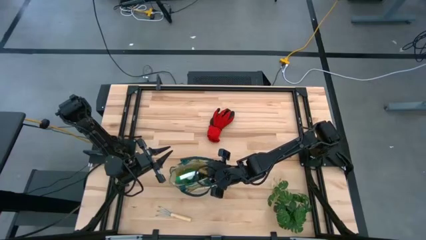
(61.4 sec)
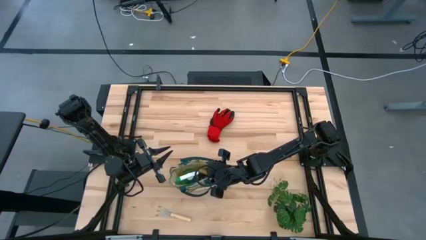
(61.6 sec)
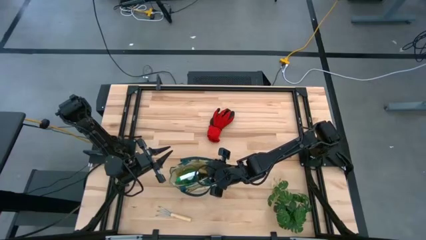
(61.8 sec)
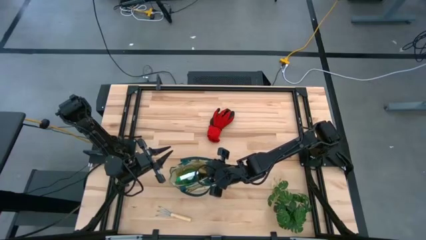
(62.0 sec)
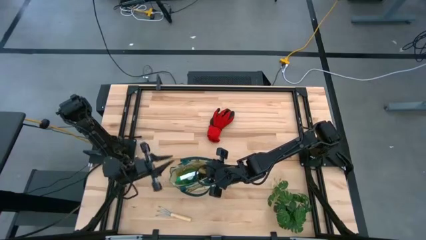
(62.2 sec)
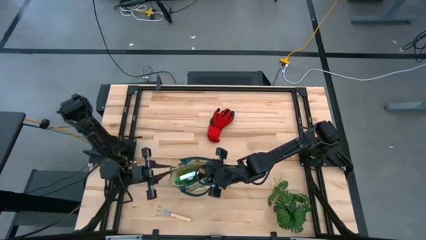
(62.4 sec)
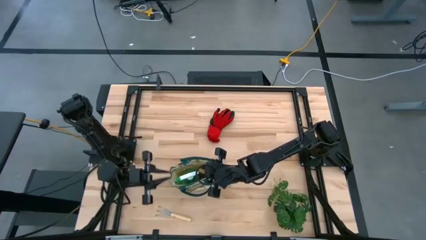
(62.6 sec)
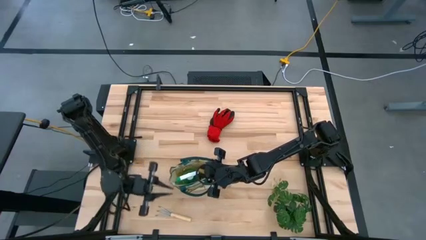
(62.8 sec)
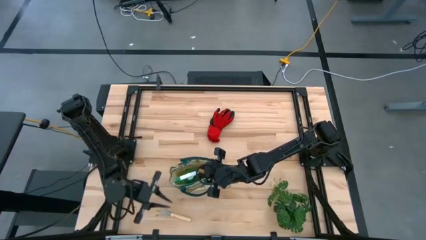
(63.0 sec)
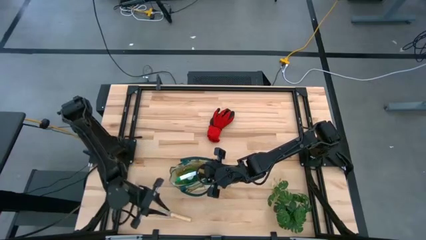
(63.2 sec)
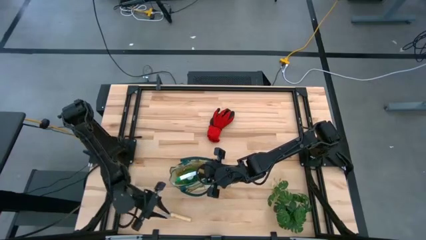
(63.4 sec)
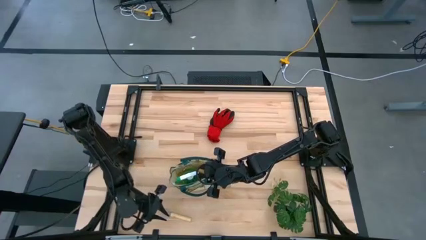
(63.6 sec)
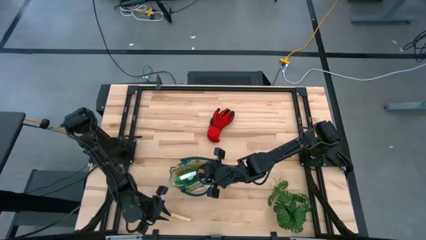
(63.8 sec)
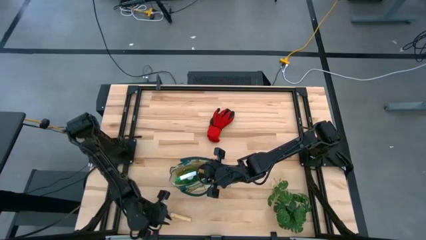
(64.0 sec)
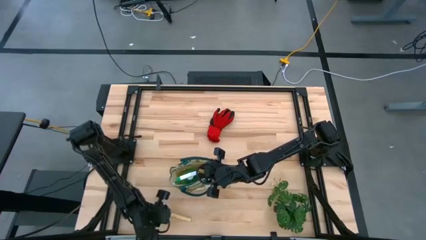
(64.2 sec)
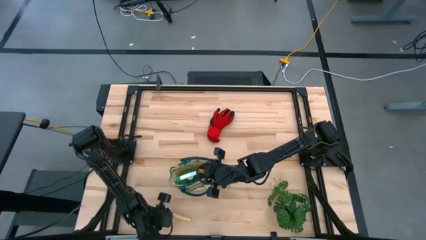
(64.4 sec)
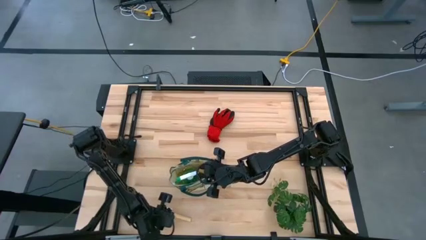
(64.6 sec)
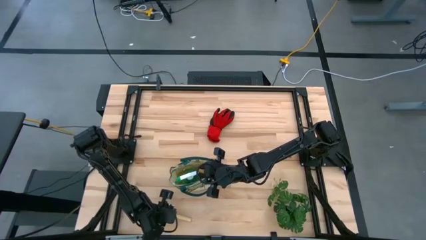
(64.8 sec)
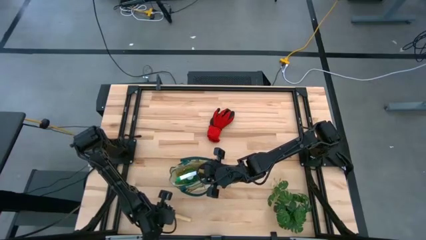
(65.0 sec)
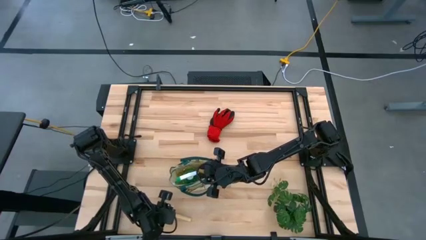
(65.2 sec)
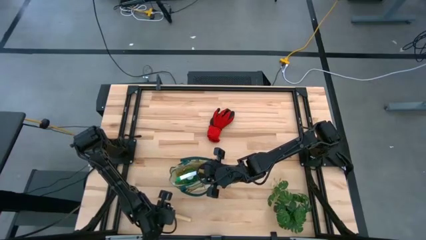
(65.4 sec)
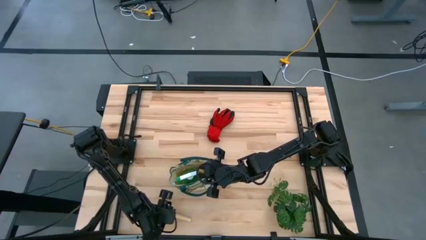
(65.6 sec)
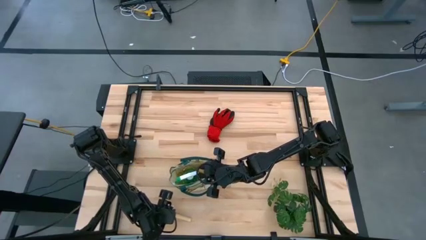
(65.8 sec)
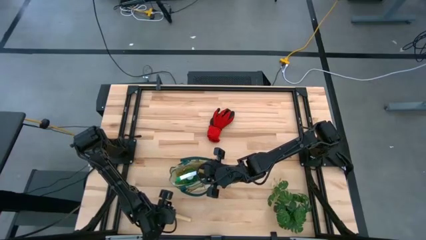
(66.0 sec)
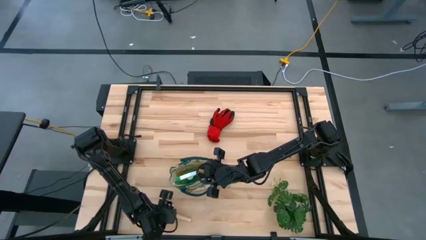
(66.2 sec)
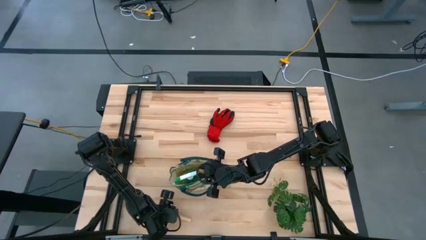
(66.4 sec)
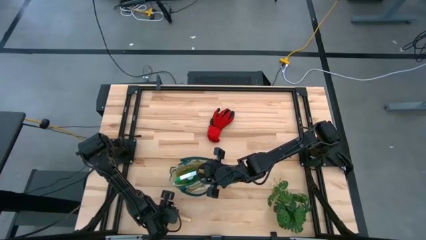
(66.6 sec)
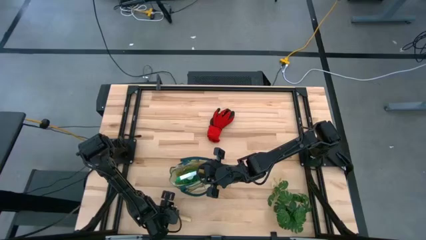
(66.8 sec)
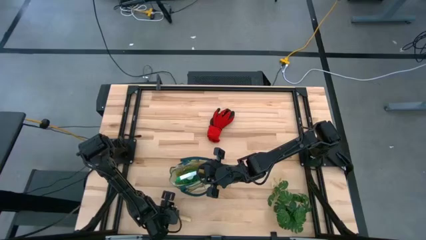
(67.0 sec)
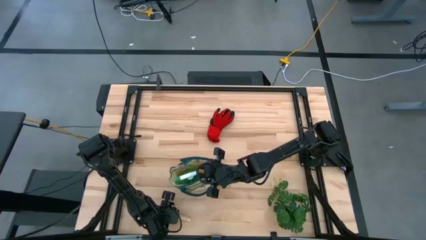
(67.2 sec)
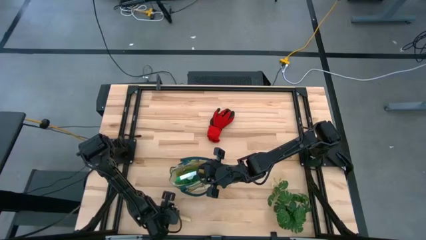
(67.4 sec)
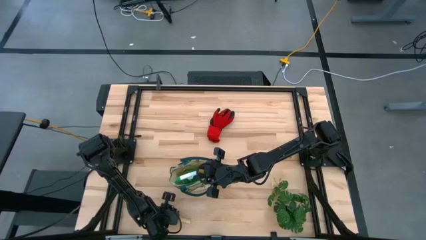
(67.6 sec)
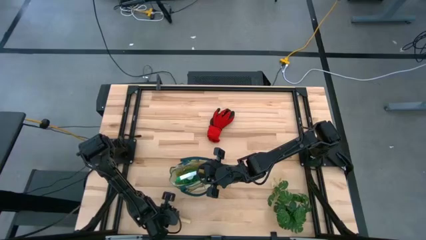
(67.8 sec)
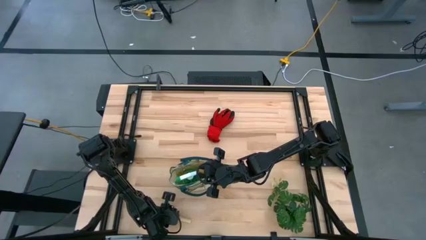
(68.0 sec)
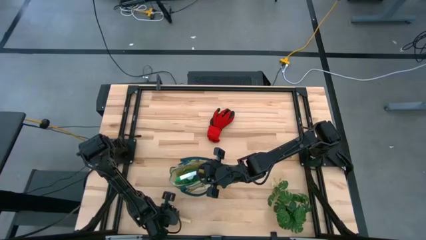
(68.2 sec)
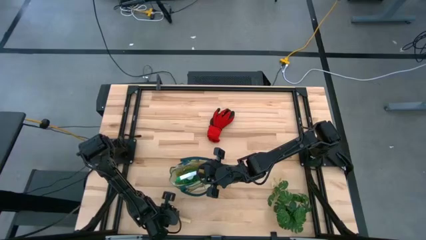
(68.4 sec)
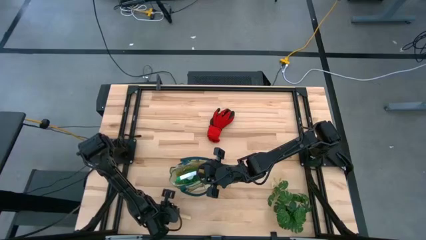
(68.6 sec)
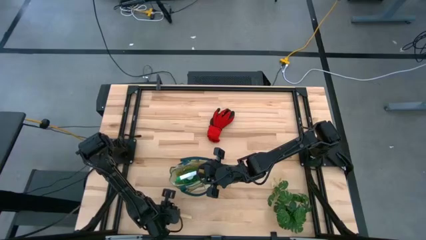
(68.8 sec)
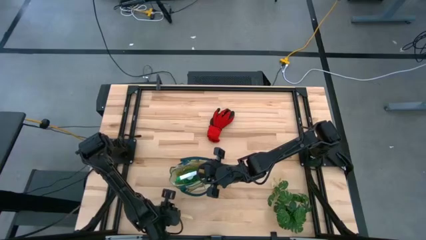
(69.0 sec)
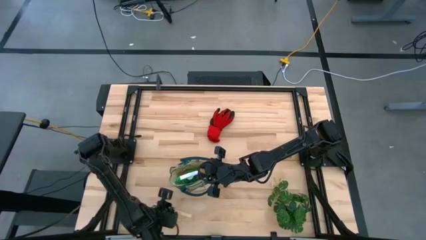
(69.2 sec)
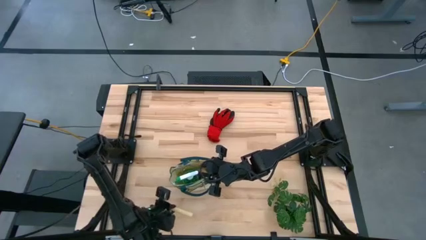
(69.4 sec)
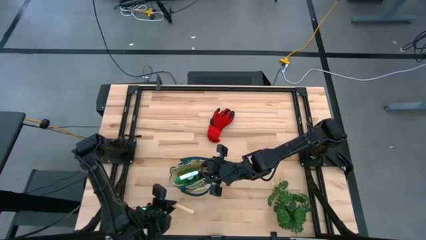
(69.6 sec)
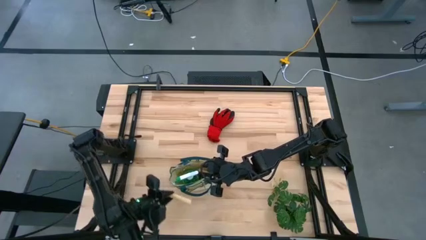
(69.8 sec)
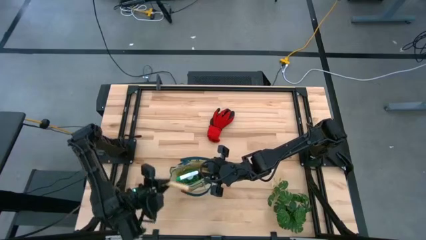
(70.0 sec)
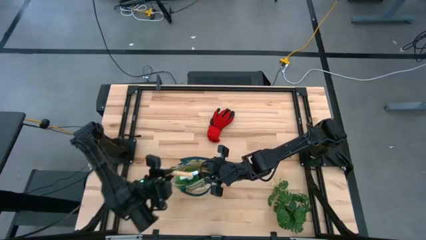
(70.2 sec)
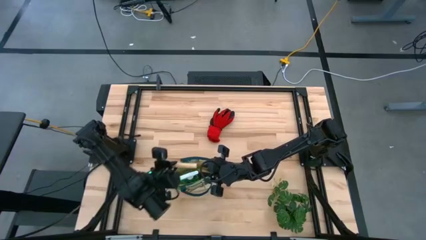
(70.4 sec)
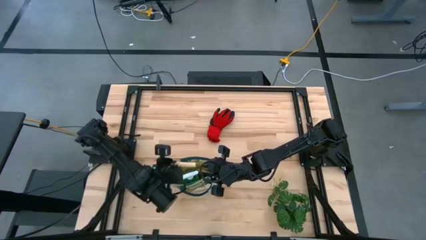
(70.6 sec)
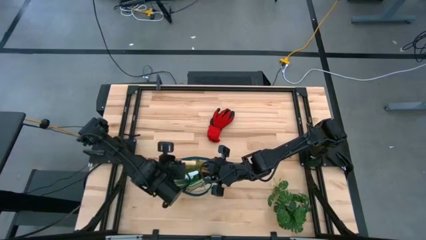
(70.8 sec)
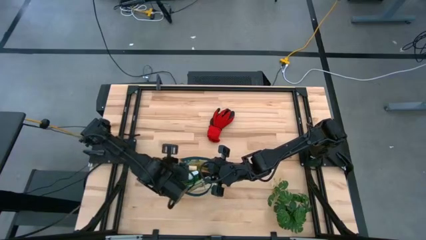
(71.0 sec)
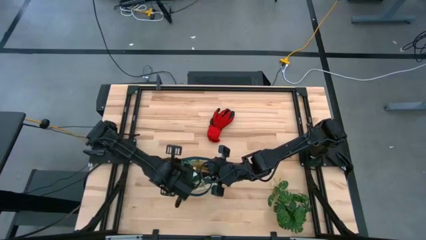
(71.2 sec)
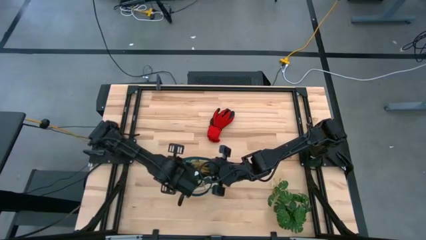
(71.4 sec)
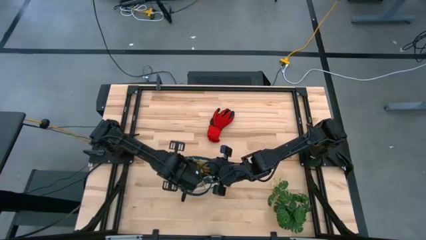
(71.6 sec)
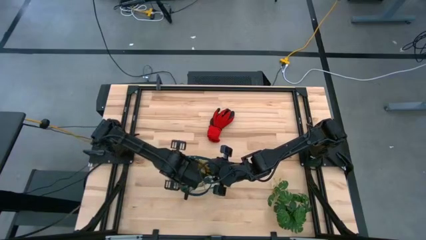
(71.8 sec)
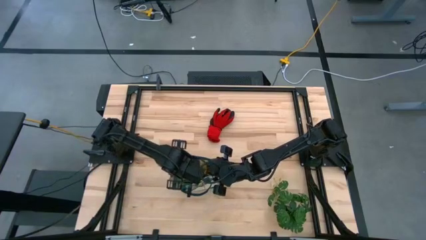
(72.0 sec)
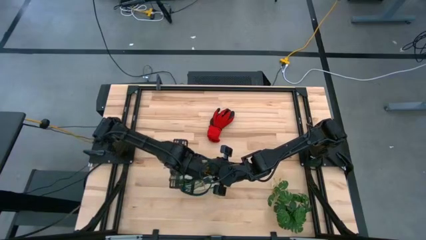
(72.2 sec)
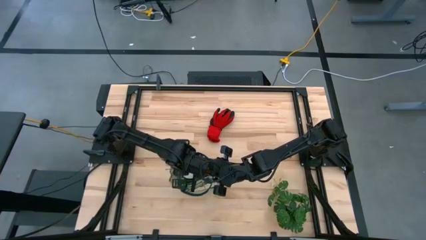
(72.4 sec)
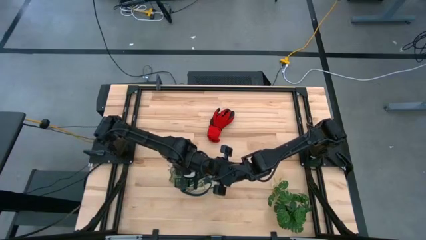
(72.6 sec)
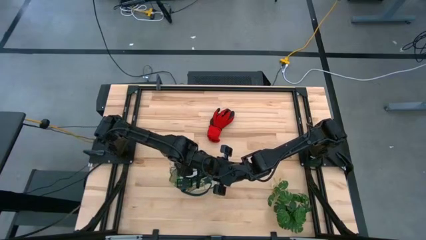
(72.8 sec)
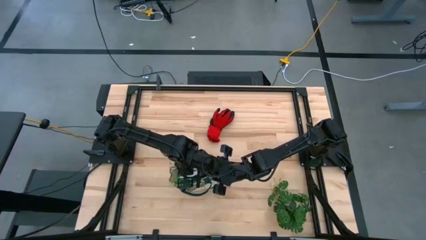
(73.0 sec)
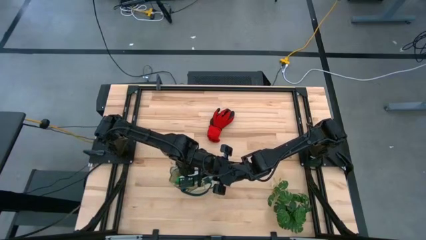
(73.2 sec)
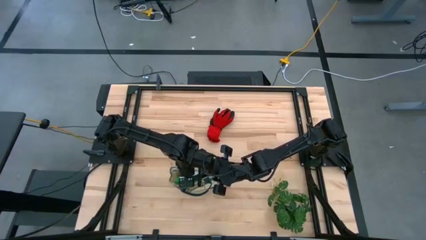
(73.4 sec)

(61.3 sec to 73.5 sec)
Task: Pick & Place Garden tools in Gardening bag
Put the hand rake into the gardening bag
